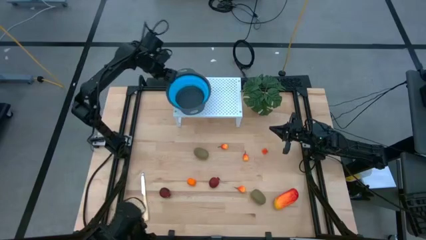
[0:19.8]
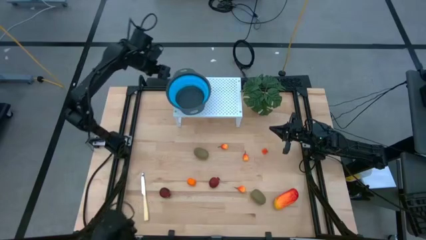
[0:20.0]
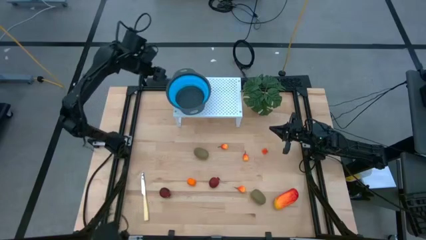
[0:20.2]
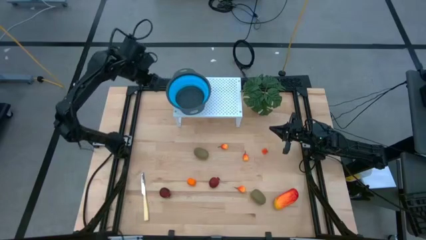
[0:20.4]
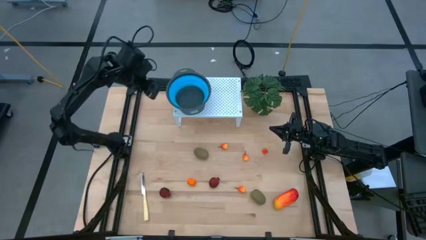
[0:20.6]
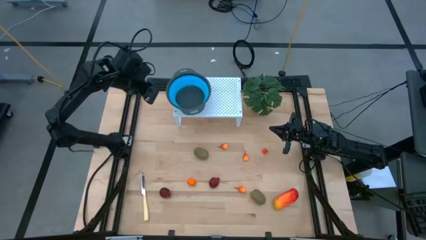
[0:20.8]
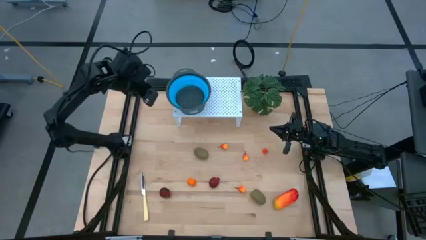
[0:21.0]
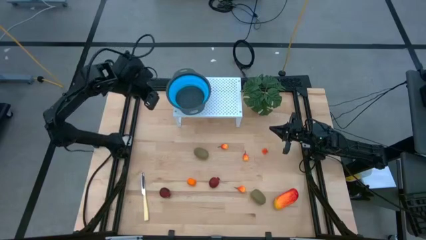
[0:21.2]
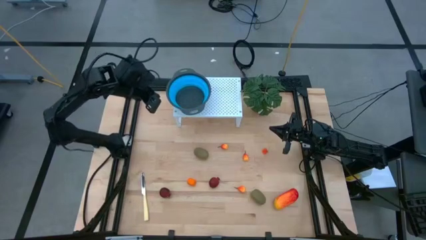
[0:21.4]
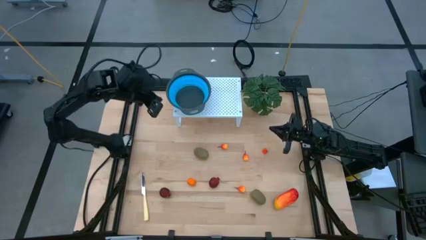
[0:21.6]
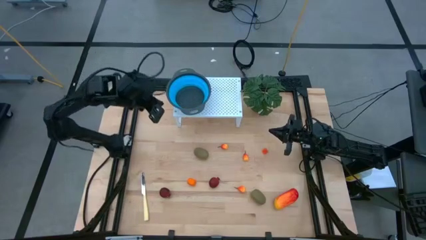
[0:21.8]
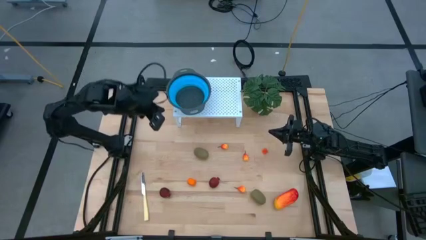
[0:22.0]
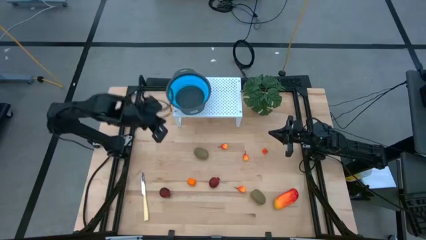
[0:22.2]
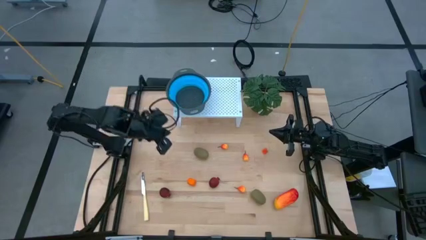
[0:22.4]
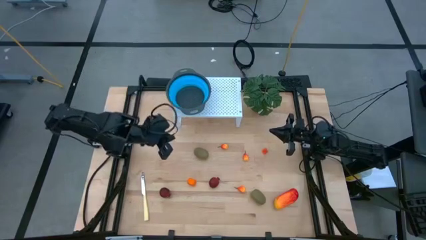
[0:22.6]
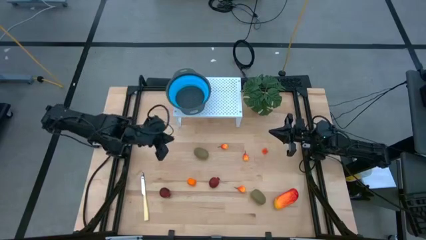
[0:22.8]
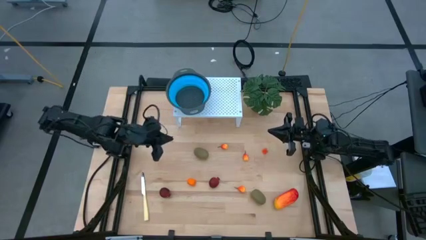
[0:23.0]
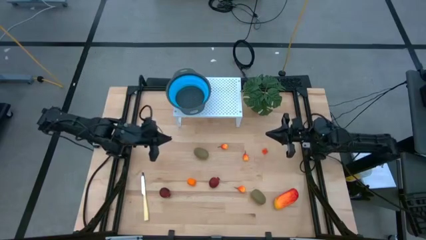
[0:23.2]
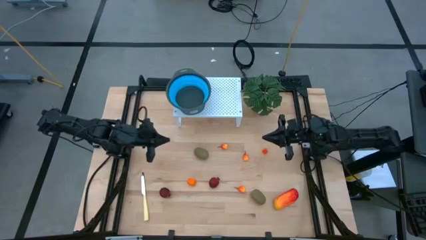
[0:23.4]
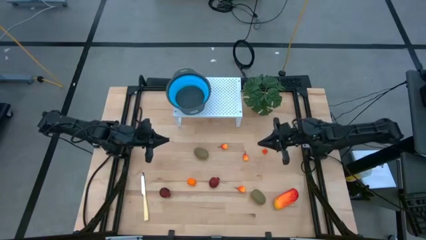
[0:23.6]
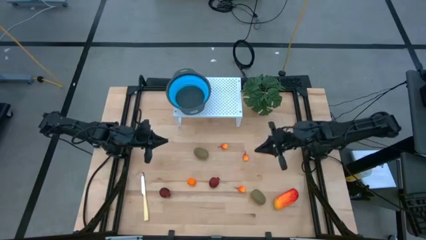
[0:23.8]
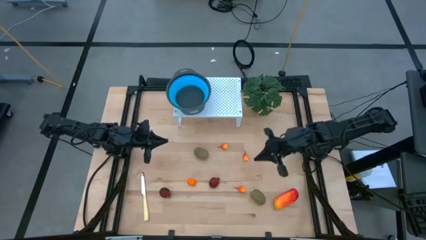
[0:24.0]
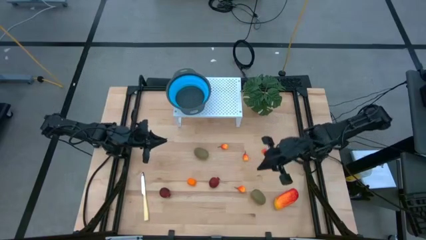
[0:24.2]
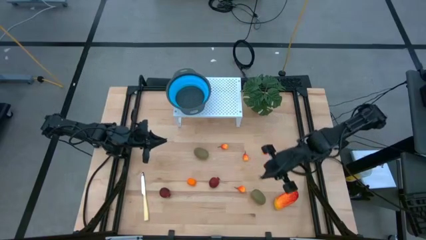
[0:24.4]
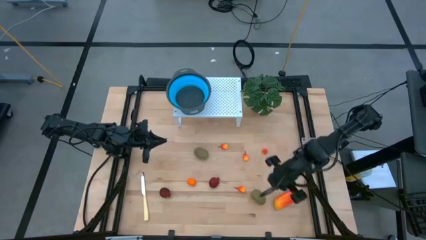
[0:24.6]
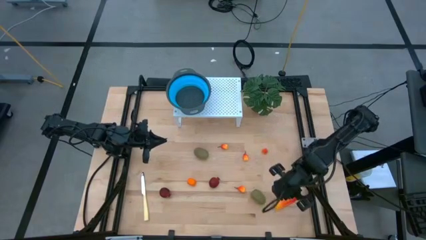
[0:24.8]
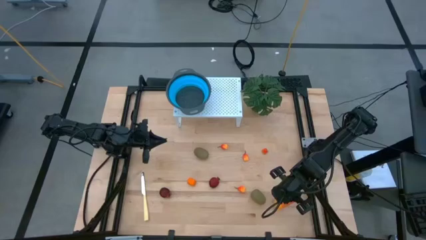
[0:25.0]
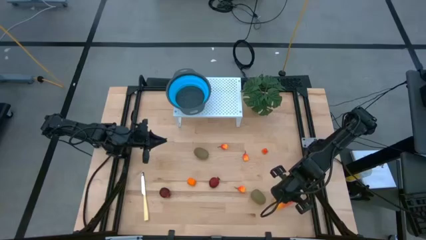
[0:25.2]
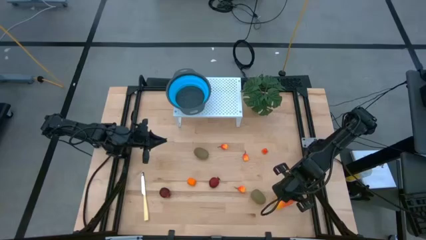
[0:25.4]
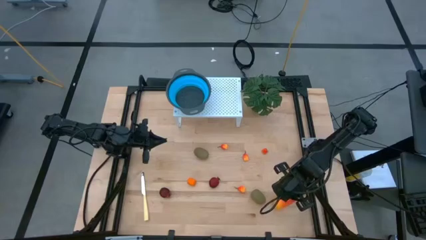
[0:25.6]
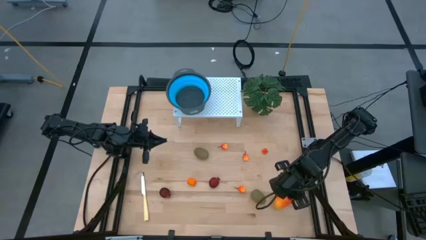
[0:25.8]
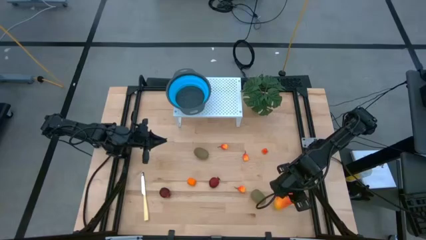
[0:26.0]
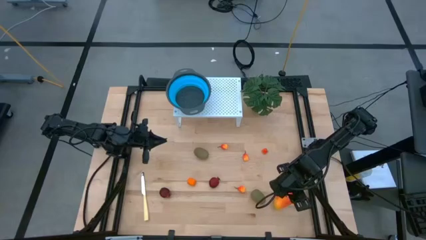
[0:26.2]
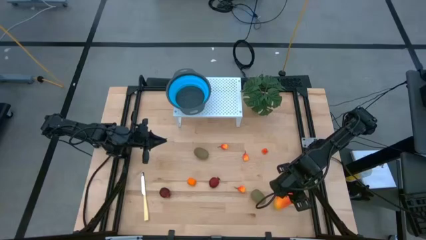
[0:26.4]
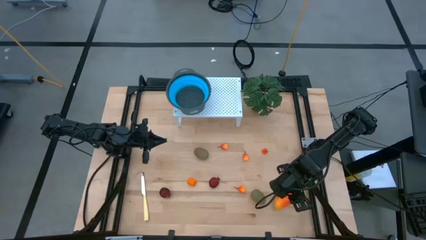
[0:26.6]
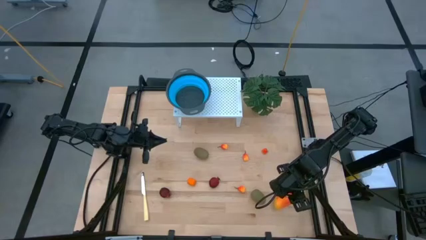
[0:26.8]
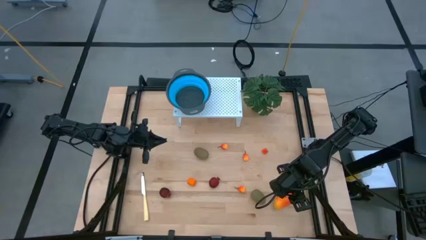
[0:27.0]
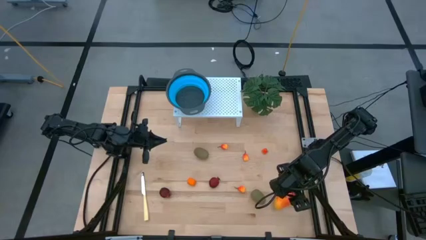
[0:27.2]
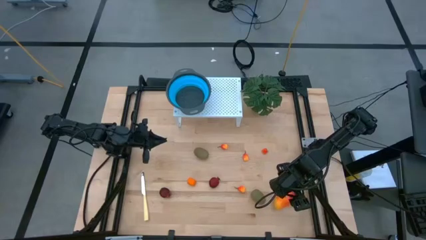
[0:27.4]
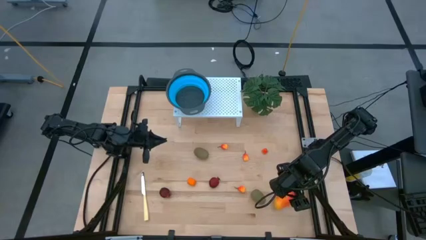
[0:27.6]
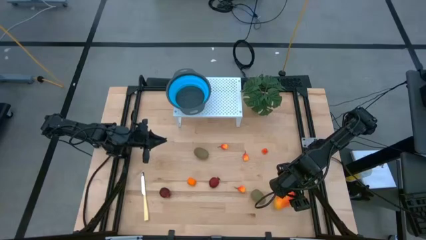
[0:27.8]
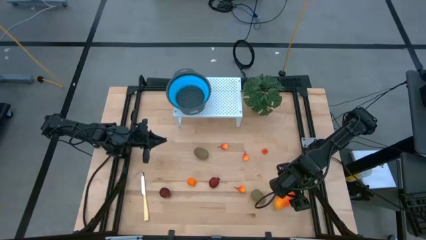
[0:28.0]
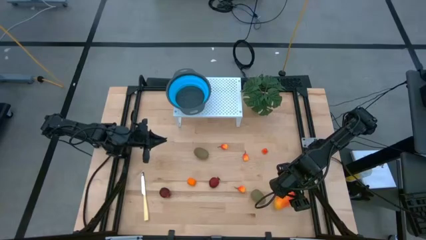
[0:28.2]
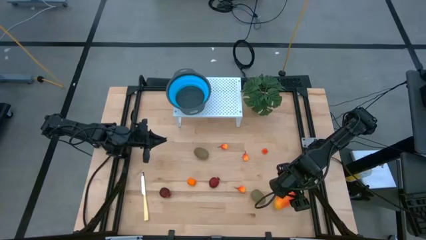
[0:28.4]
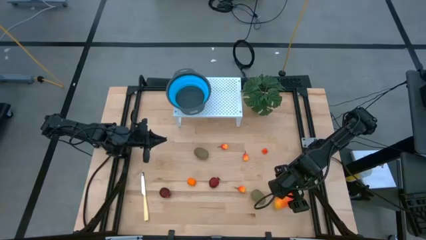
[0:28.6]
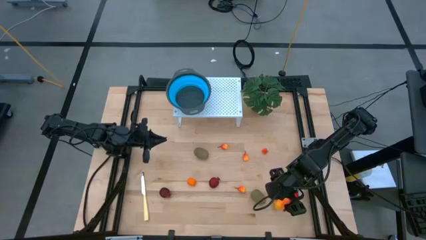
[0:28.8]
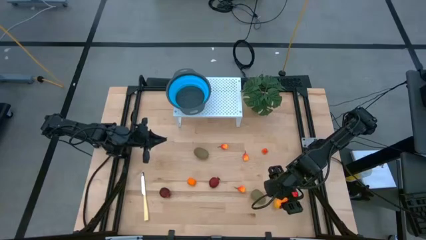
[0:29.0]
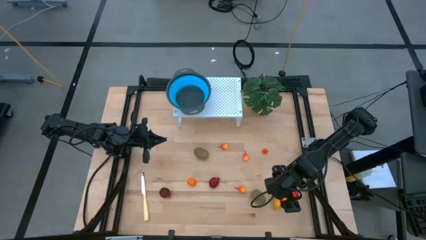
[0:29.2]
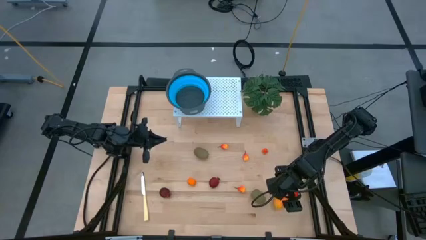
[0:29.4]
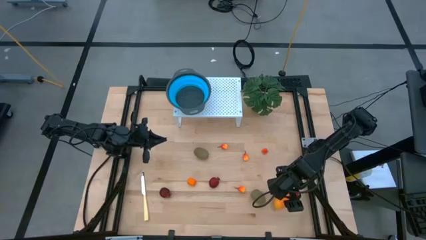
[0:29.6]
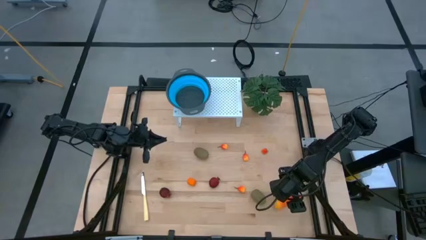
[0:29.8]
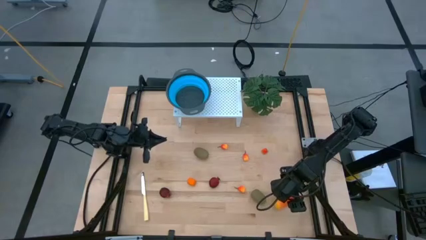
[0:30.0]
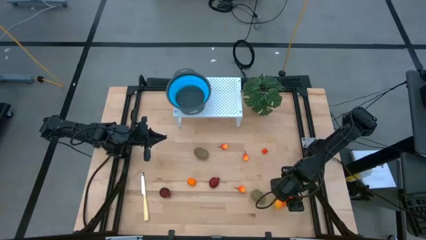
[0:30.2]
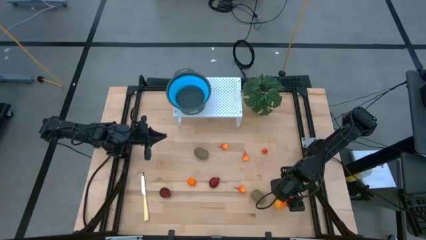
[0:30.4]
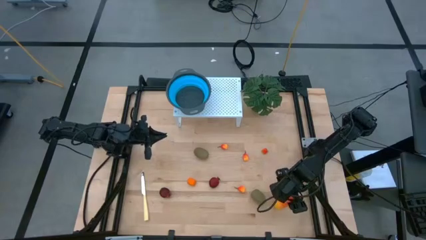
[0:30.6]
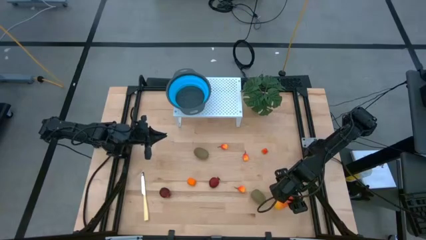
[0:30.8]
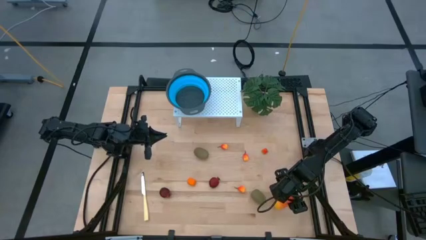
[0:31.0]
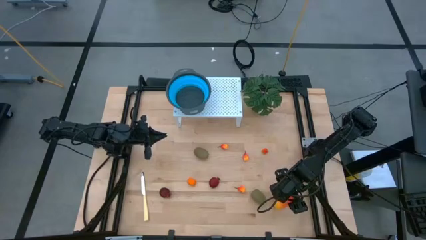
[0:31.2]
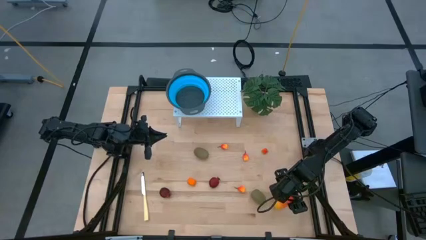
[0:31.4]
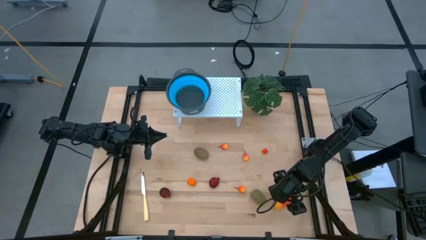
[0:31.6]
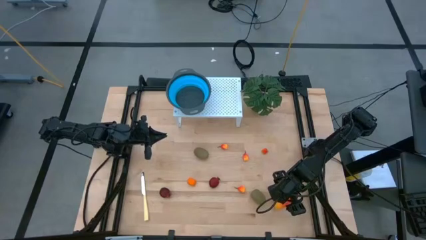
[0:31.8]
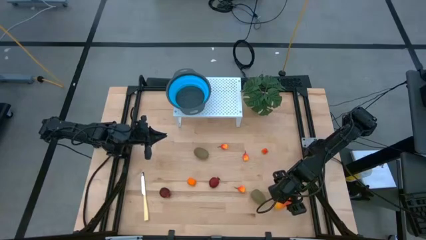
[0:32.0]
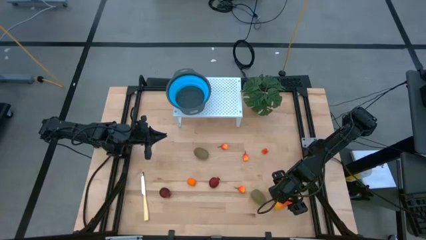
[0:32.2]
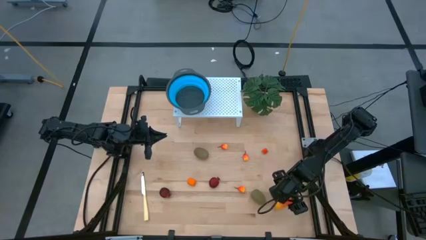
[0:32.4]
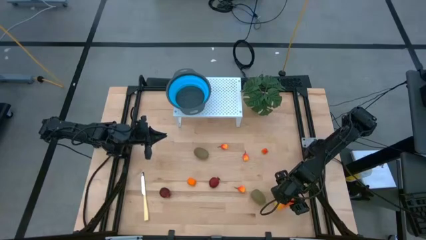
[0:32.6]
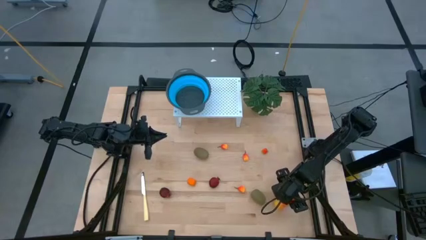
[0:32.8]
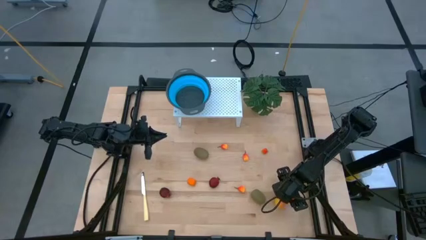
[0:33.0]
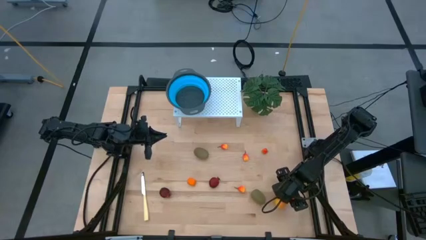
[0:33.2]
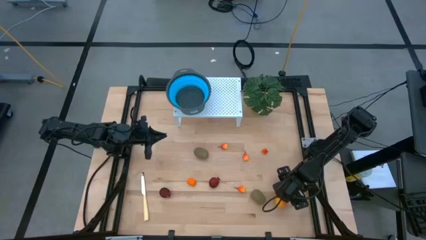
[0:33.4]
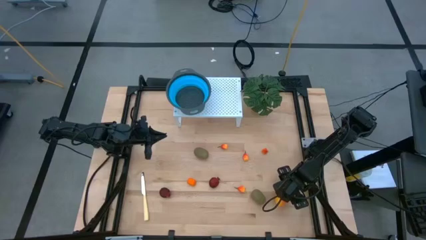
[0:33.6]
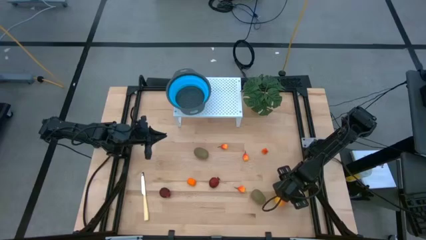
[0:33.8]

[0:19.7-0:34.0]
Task: Pick & Place Fruit
Put the mango in the blue strainer bowl on the shelf

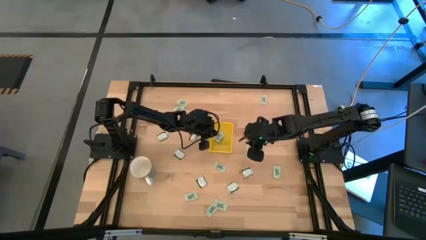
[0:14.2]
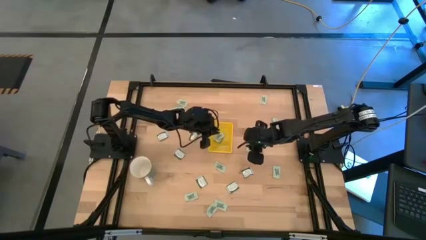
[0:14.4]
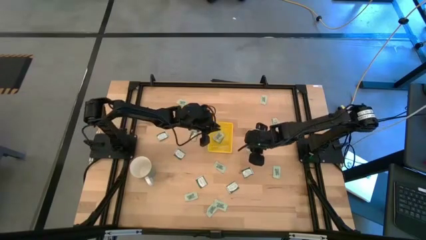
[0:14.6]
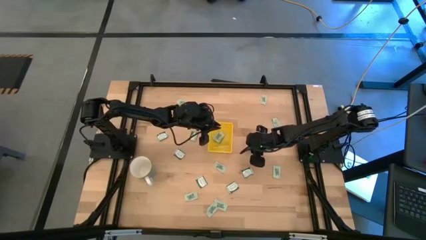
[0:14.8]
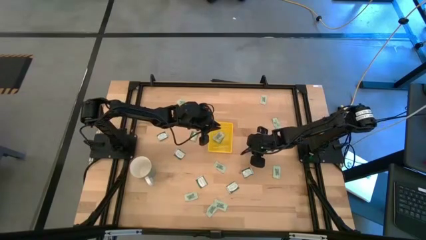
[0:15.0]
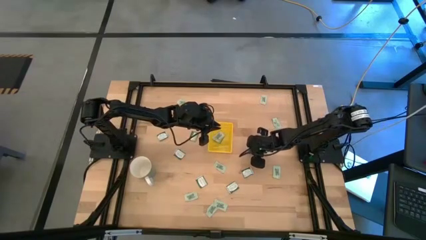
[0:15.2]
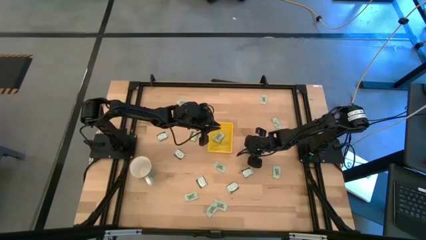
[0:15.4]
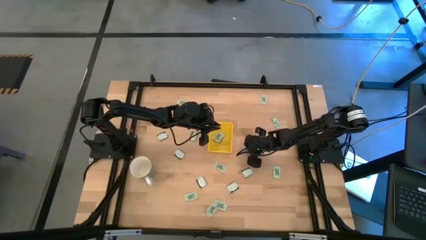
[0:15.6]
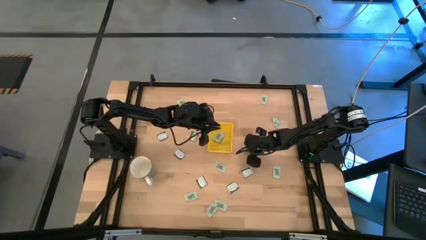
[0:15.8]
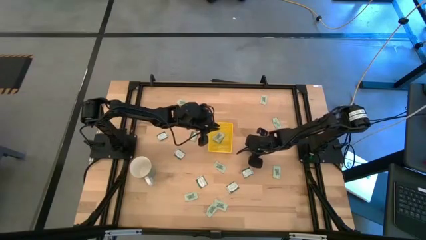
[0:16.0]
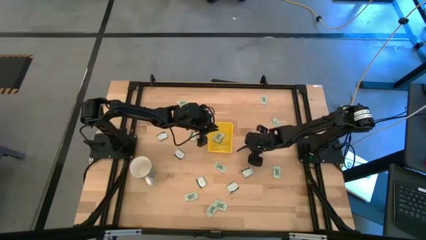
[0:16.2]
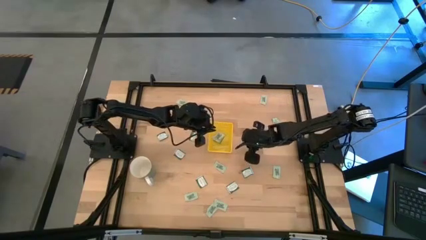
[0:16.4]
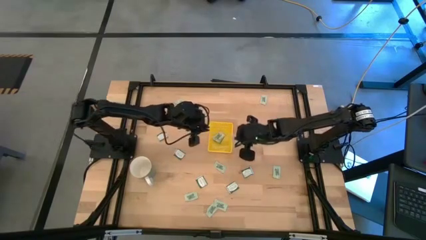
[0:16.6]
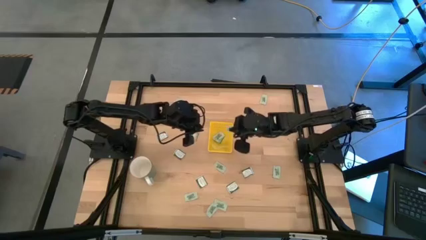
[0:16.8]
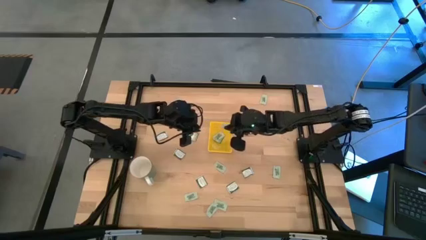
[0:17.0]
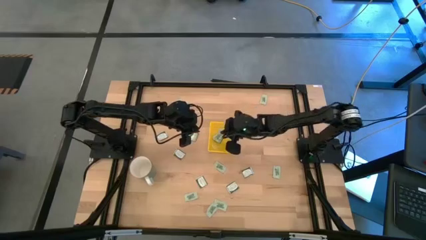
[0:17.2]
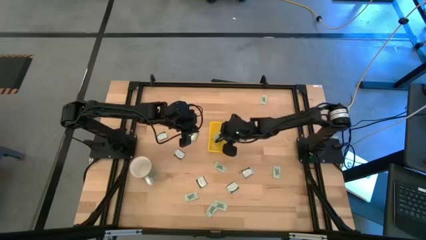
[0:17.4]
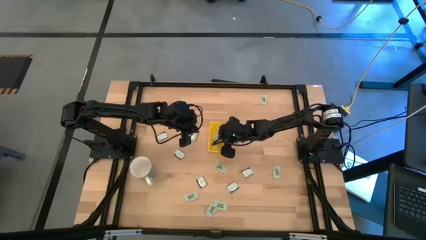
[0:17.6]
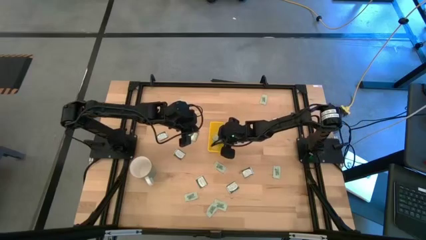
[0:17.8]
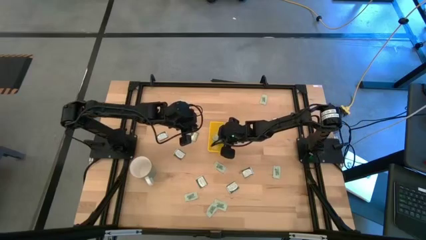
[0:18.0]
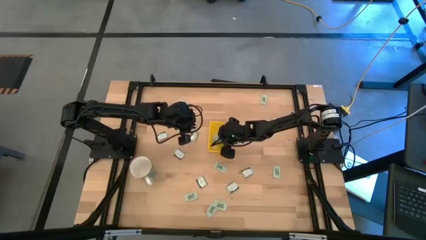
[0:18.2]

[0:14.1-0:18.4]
Task: Pick and place Stevia / Truvia into bins
Put the white stevia packet into the yellow bin
